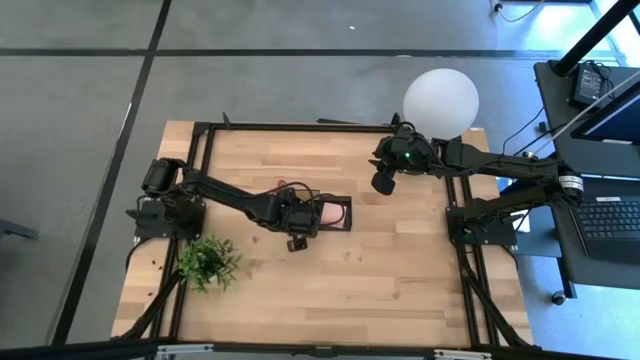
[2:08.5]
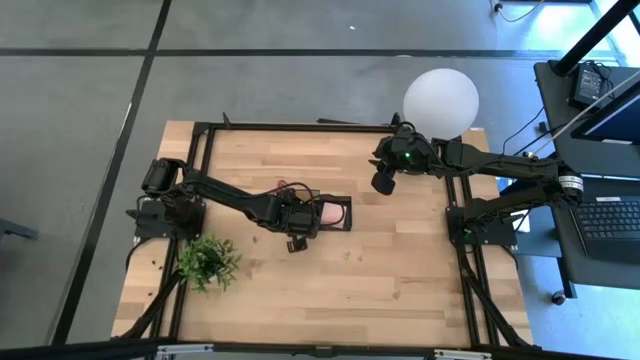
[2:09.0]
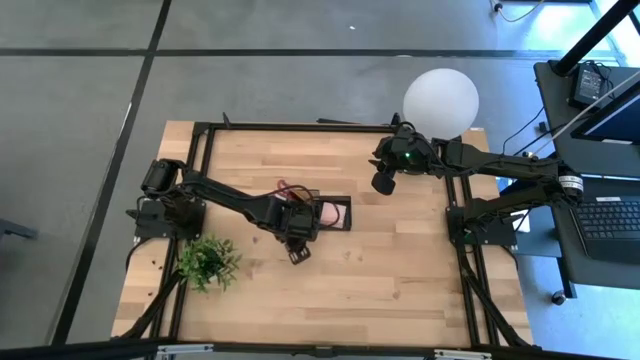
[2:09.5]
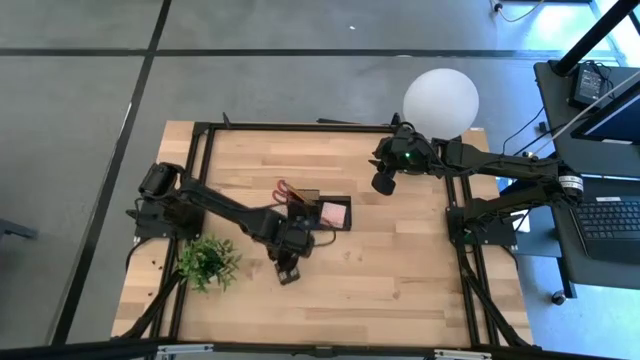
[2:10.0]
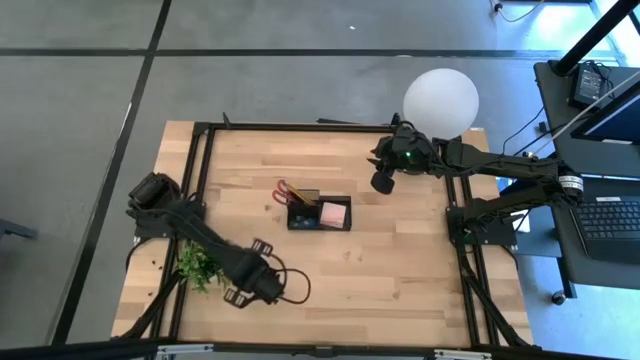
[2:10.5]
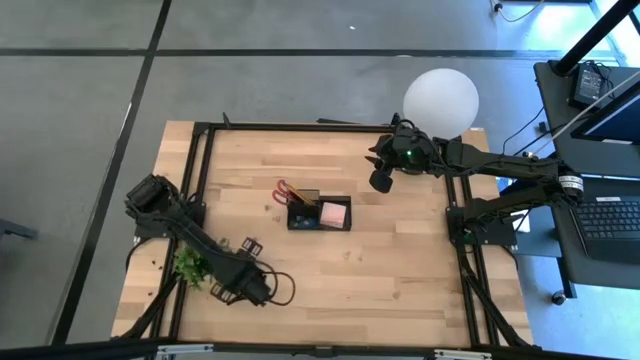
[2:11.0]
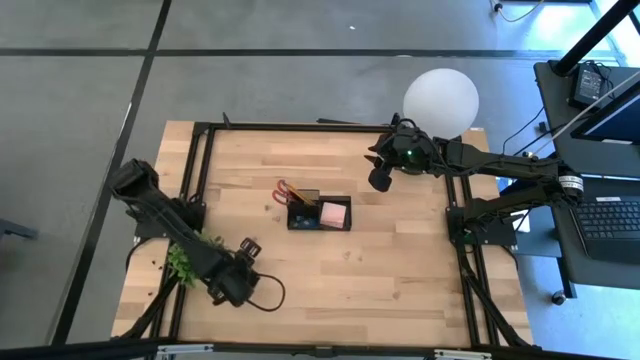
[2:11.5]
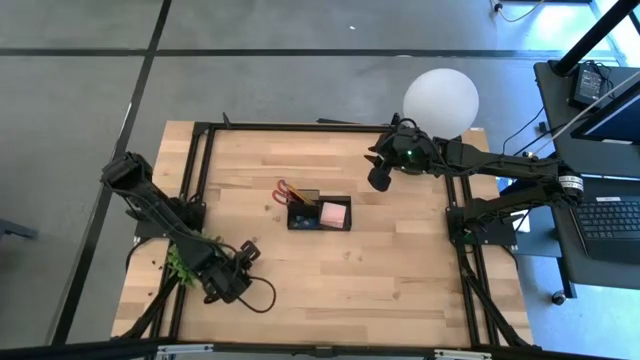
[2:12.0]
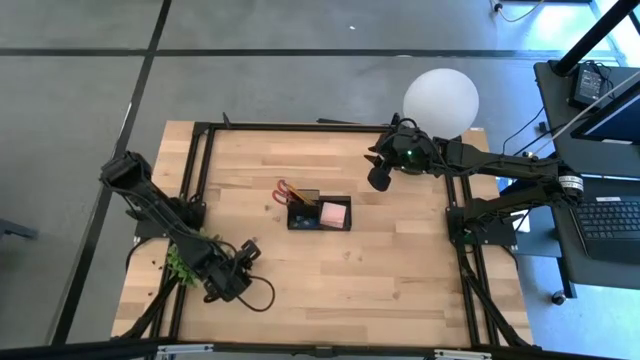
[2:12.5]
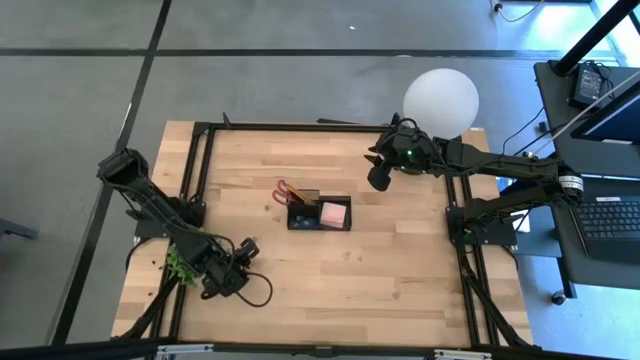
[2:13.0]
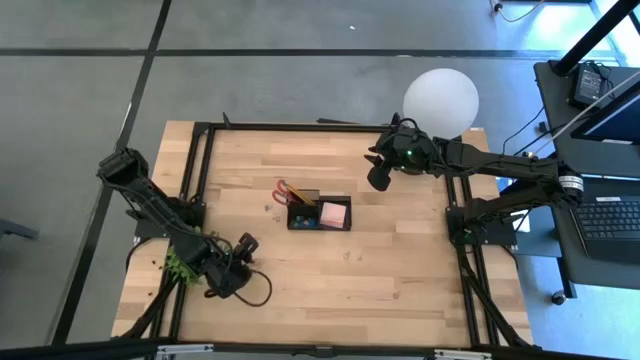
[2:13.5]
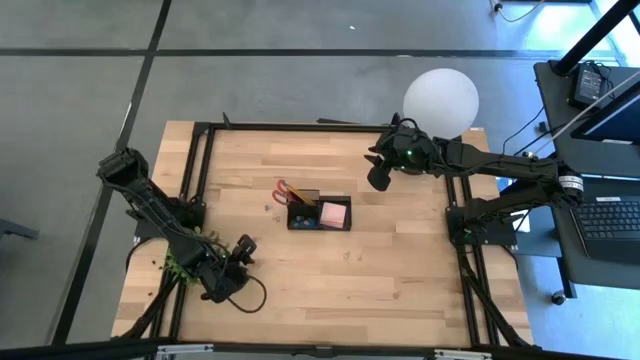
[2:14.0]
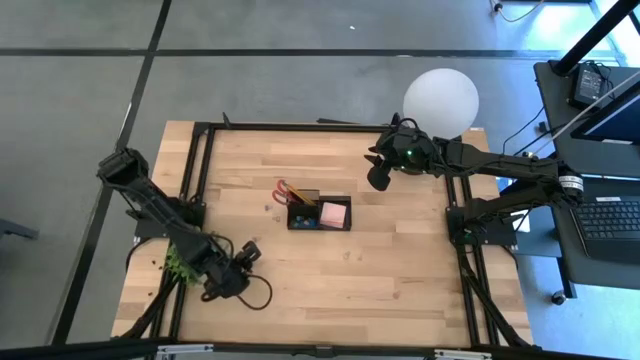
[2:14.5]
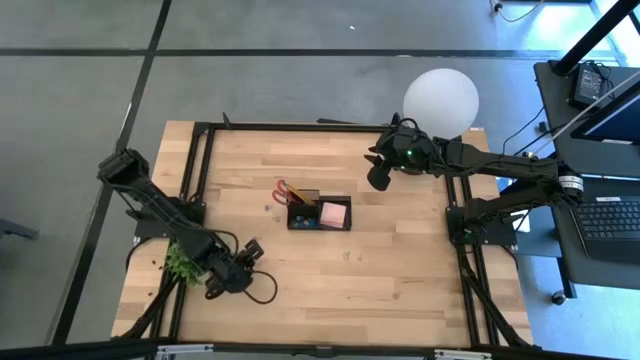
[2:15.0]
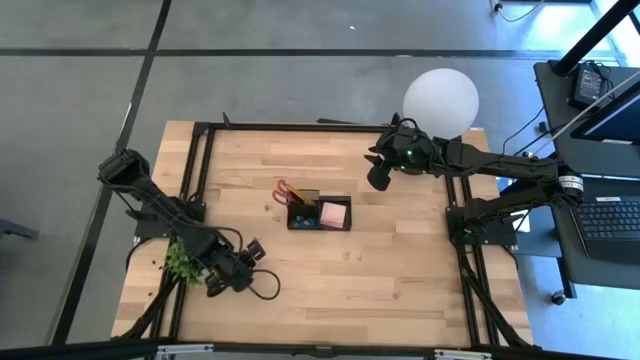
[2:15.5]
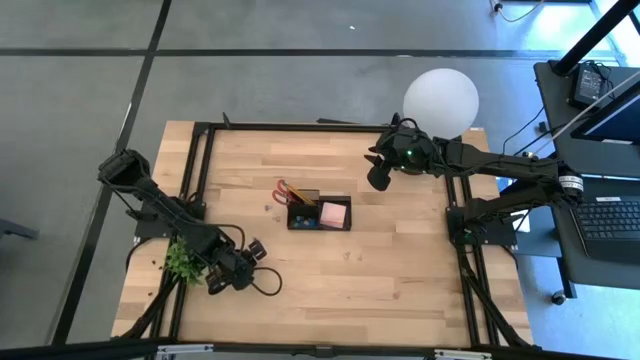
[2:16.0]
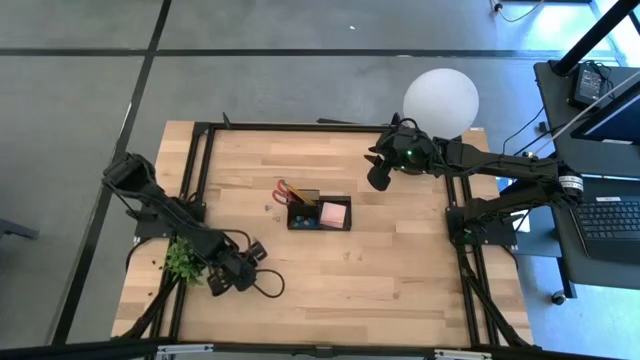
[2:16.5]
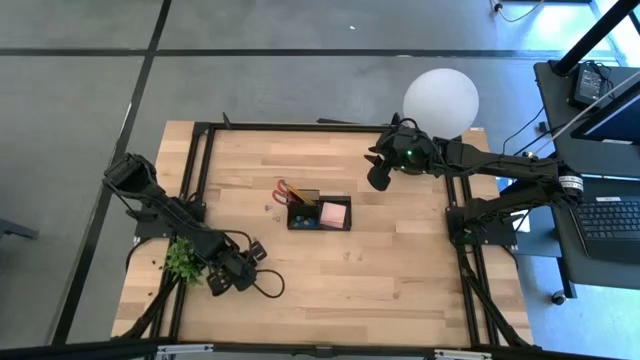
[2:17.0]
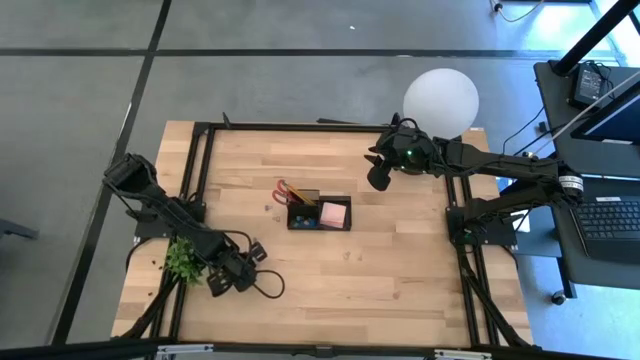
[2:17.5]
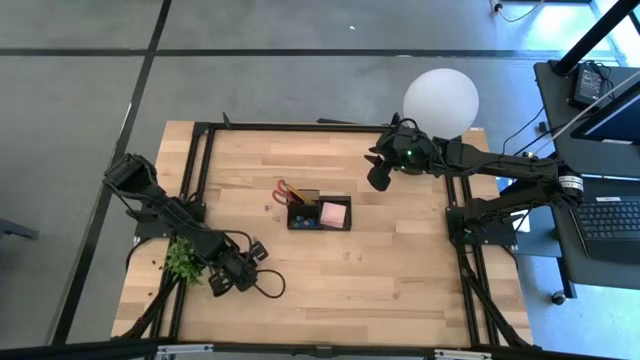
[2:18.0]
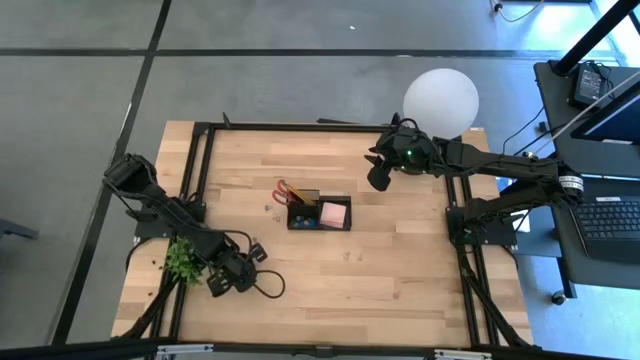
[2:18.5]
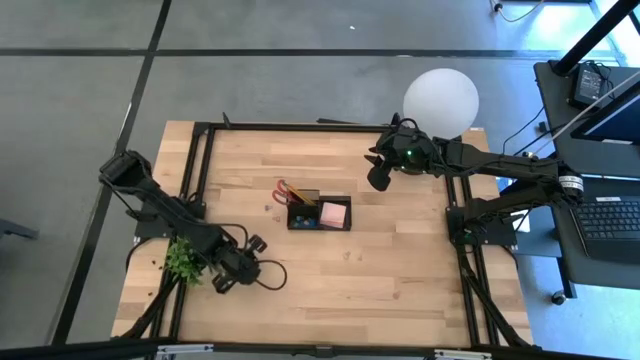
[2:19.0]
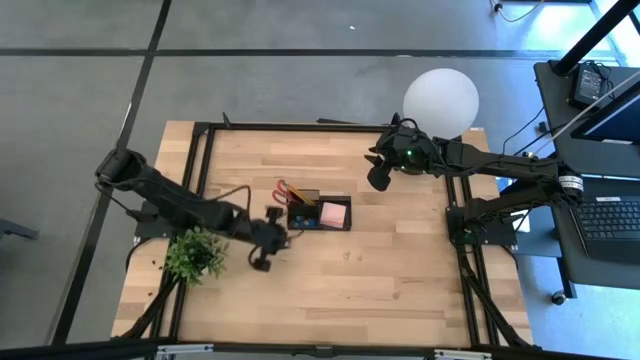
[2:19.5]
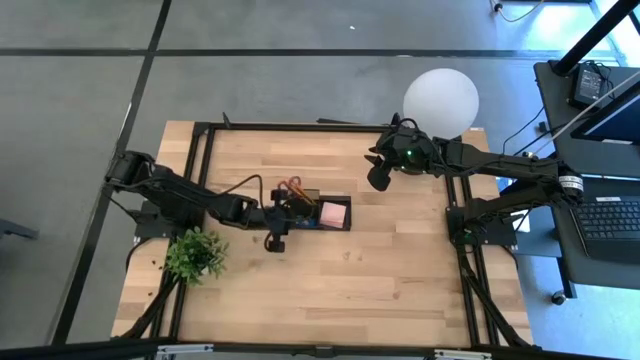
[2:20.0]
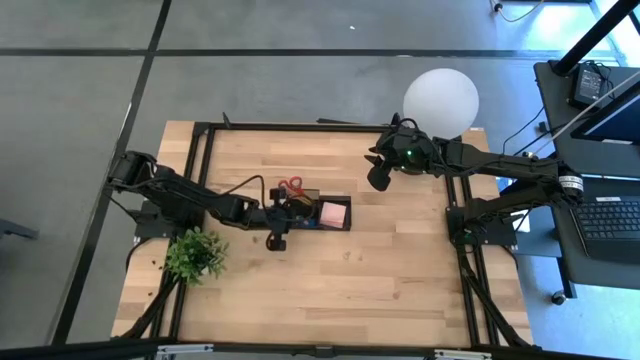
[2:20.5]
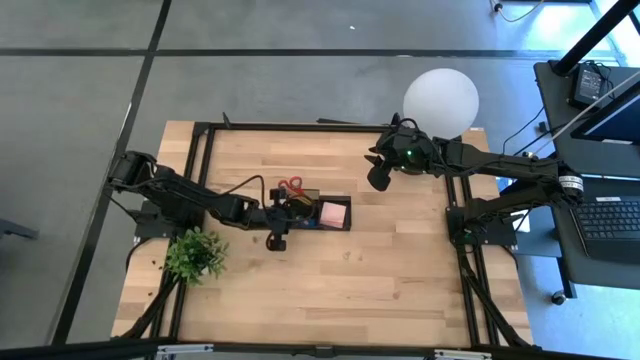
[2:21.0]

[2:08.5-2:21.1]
Task: Pick and place office supplies into organizer
Put the pink binder clip into the black desk organizer

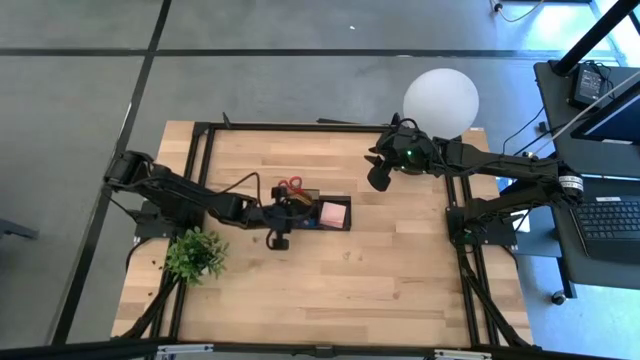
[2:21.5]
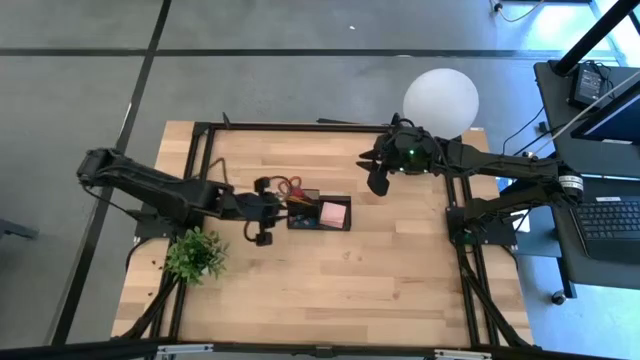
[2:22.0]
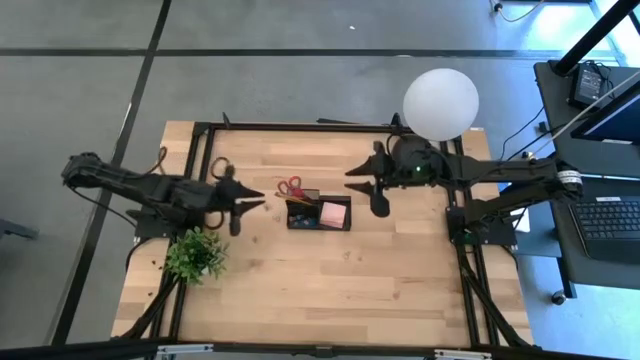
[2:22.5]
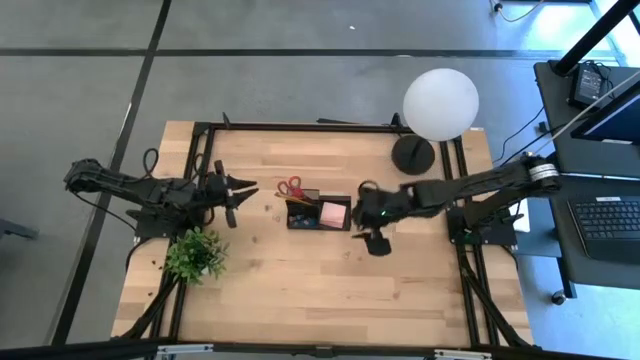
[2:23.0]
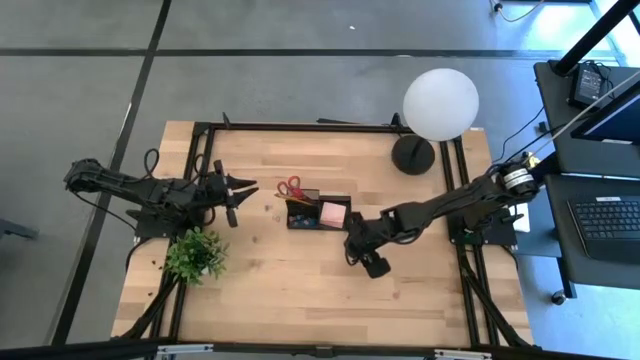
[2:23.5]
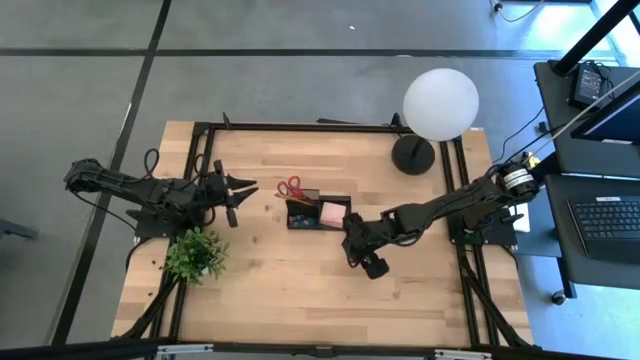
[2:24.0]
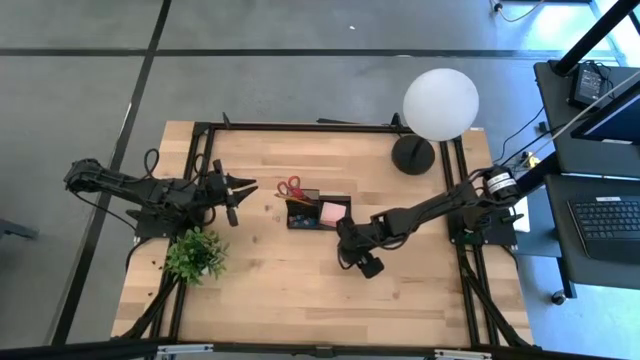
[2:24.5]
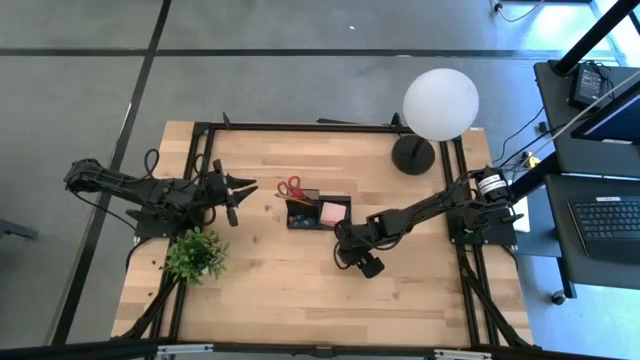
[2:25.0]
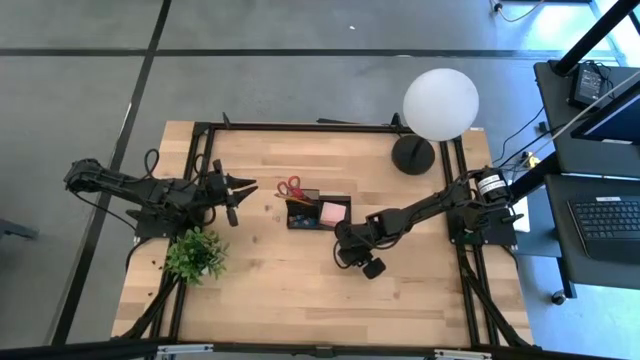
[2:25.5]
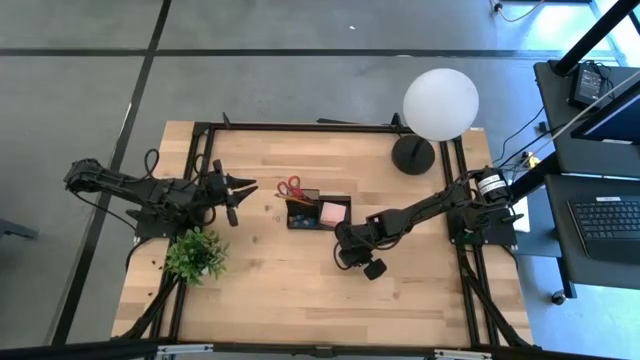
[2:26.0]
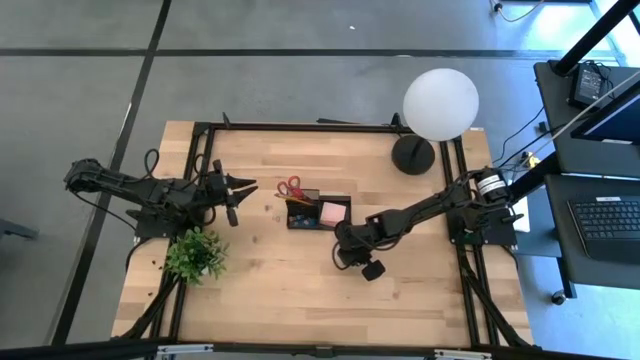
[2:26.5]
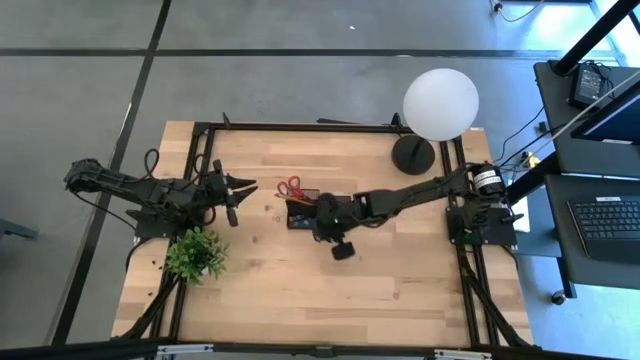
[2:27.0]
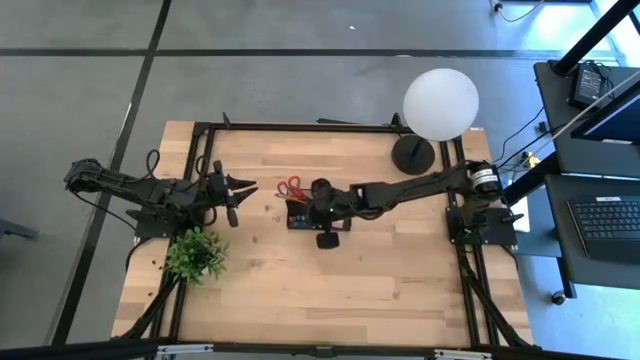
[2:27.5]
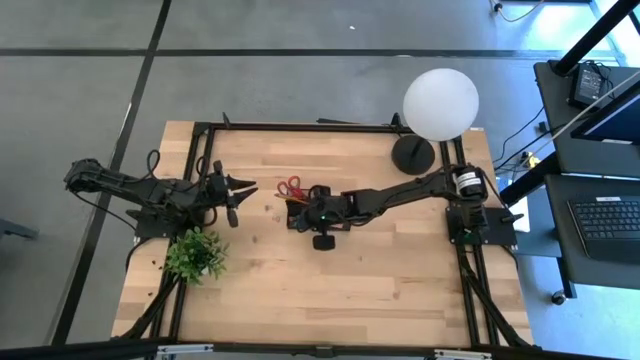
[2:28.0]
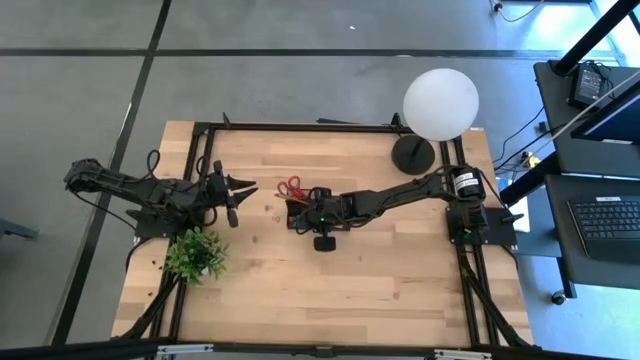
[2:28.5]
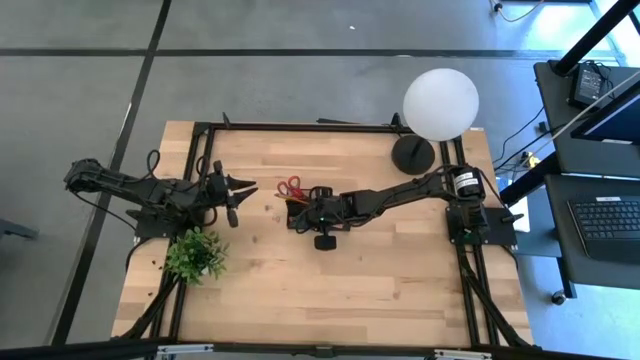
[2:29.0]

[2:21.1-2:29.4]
Put the light green binder clip into the black desk organizer

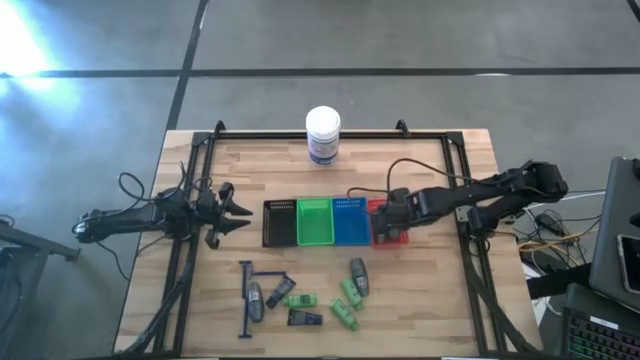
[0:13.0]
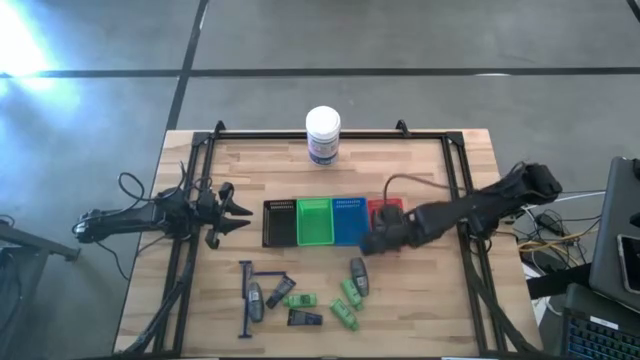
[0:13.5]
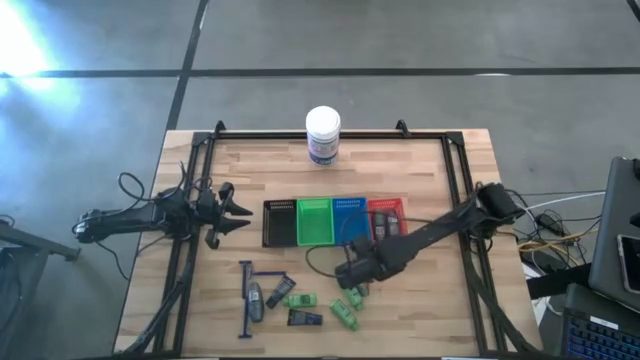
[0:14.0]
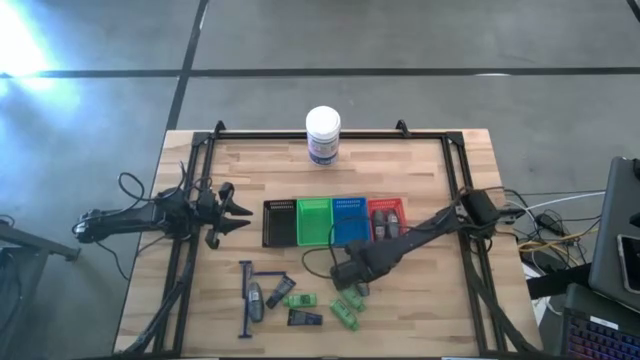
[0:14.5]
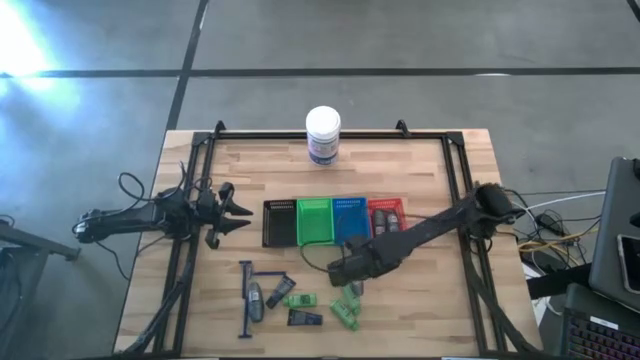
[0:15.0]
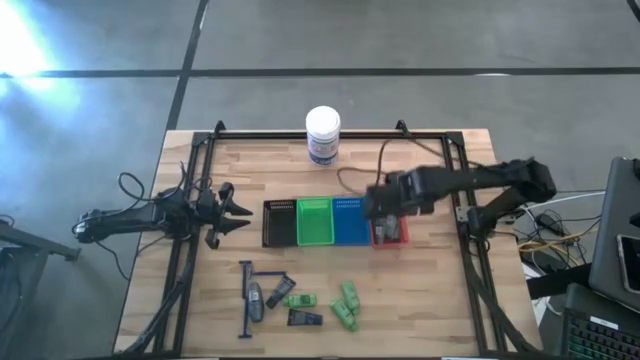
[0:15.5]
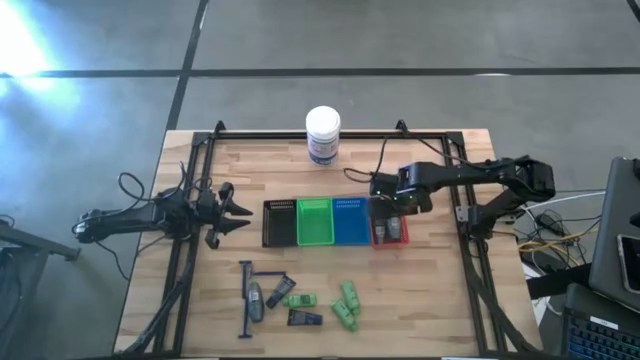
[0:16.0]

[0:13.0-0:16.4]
Task: Pick & Place Travel size toiletries
Put the black deodorant into the red bin
